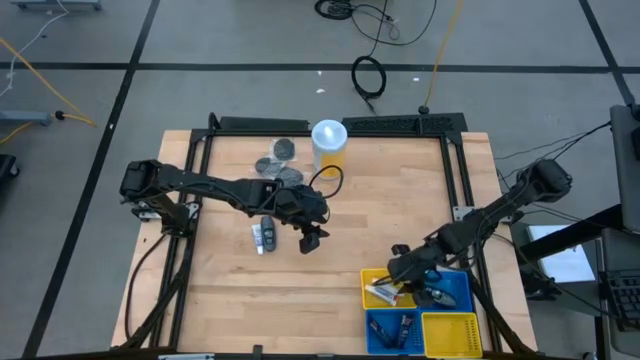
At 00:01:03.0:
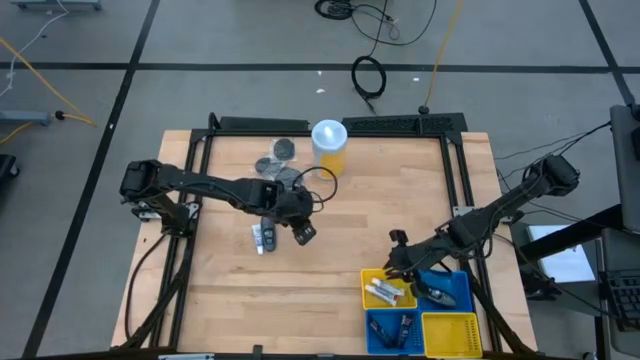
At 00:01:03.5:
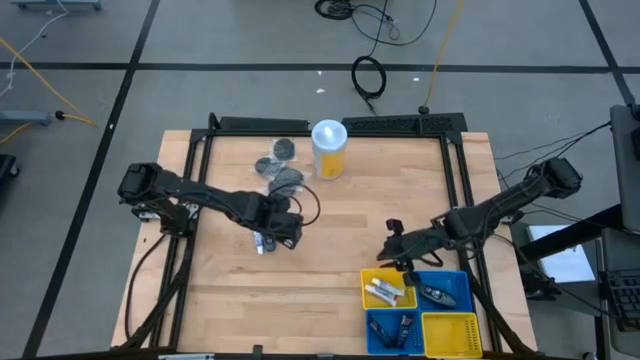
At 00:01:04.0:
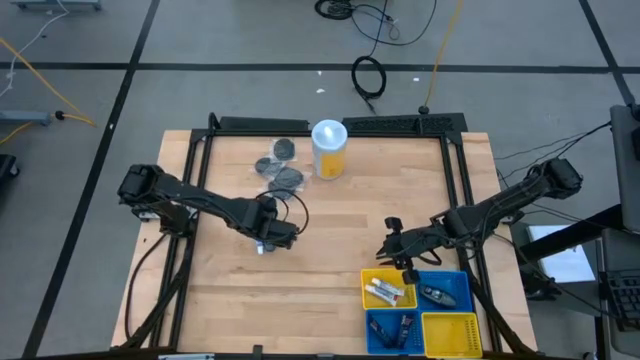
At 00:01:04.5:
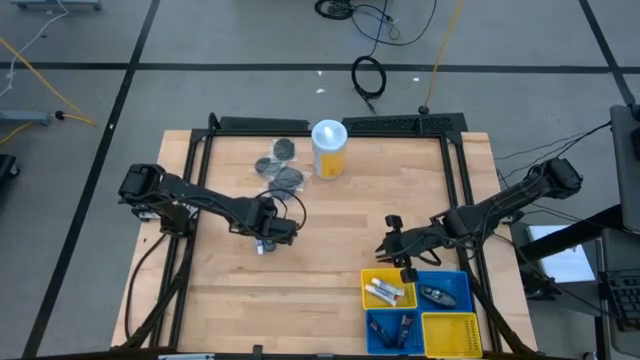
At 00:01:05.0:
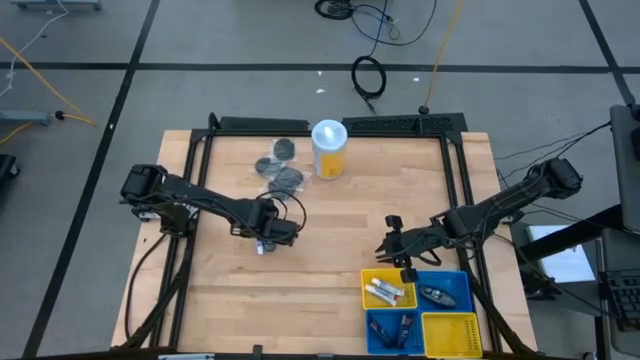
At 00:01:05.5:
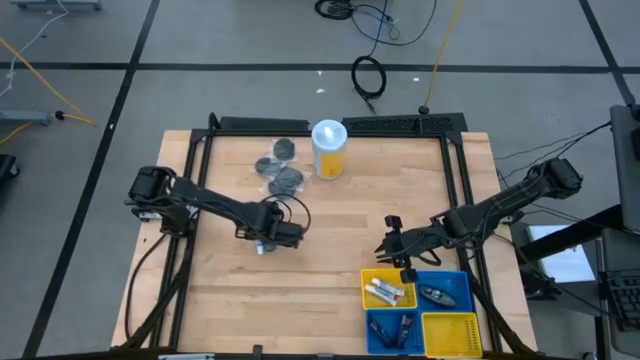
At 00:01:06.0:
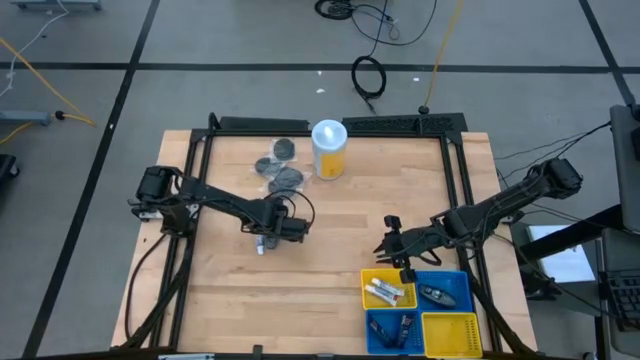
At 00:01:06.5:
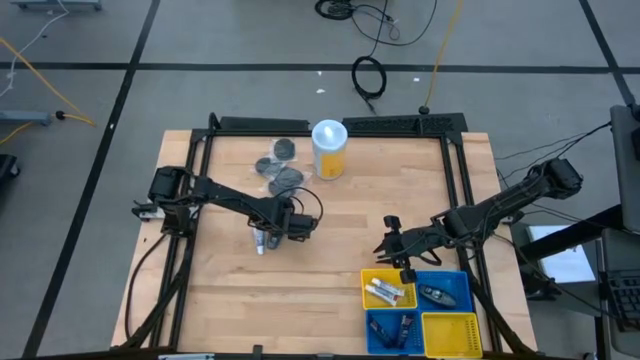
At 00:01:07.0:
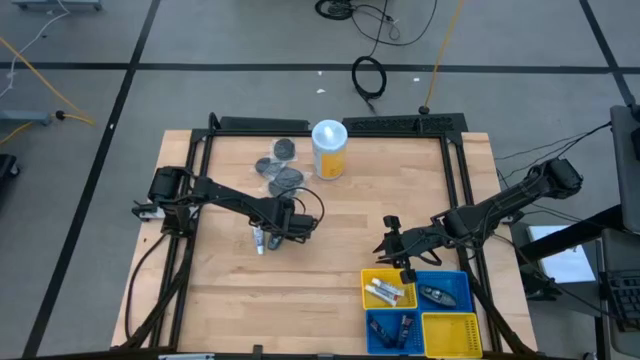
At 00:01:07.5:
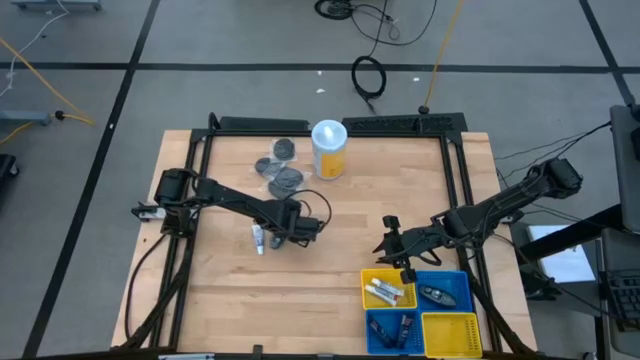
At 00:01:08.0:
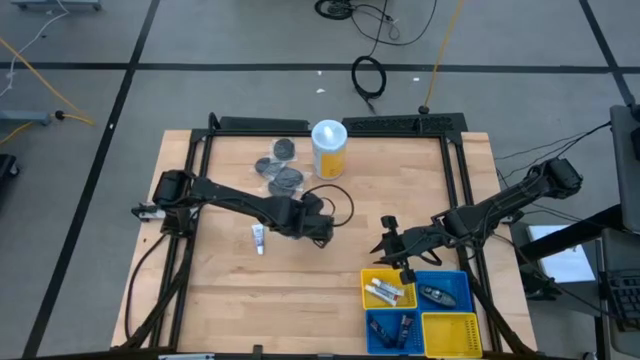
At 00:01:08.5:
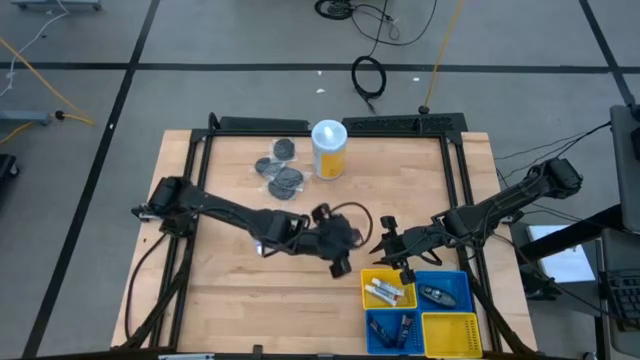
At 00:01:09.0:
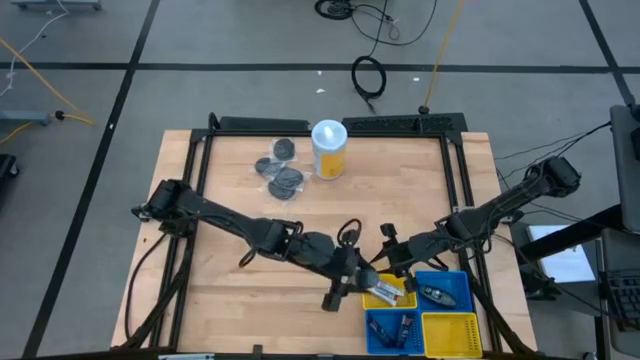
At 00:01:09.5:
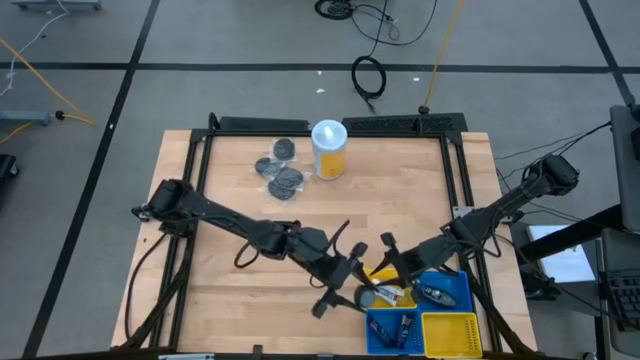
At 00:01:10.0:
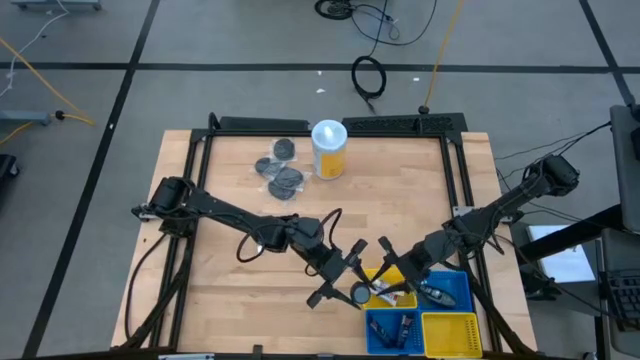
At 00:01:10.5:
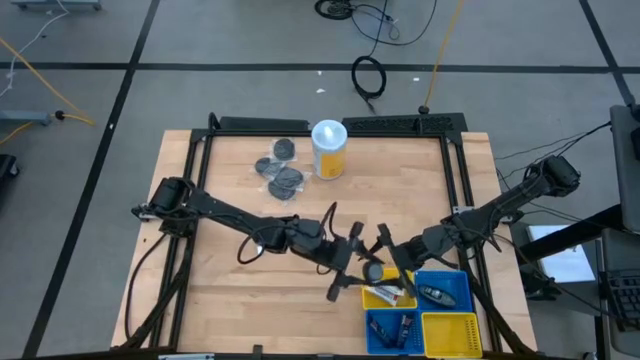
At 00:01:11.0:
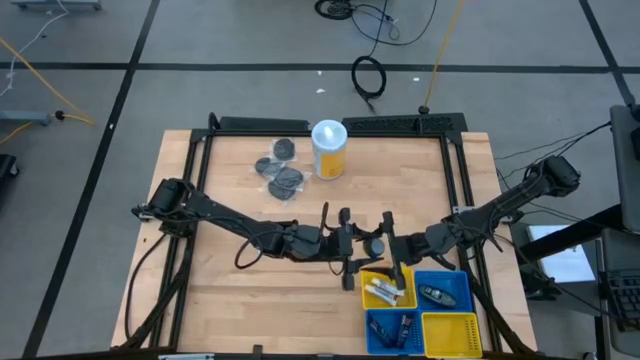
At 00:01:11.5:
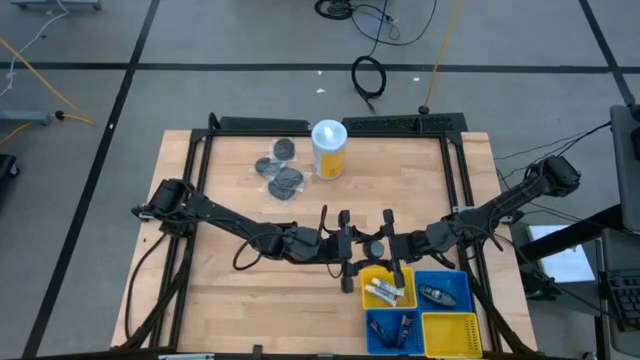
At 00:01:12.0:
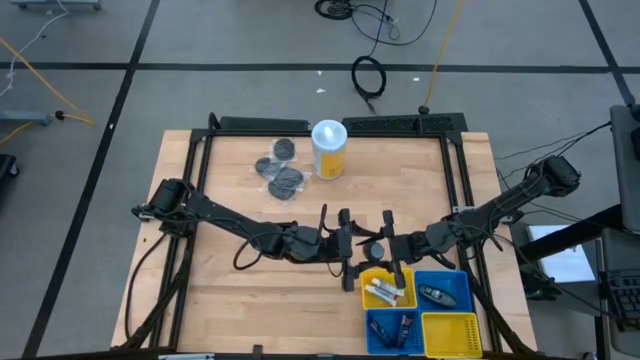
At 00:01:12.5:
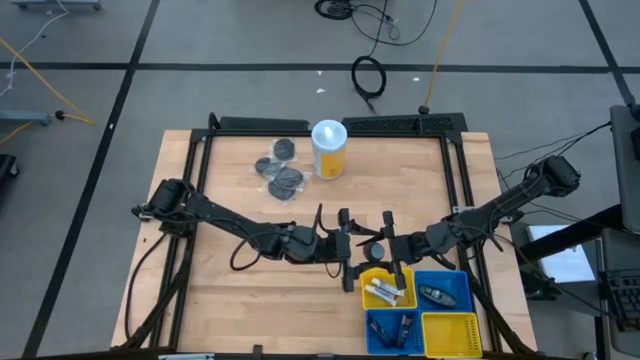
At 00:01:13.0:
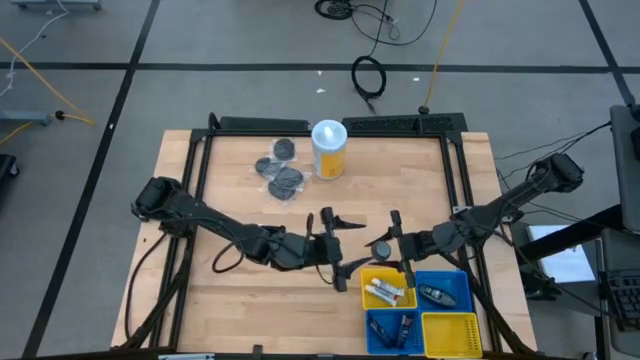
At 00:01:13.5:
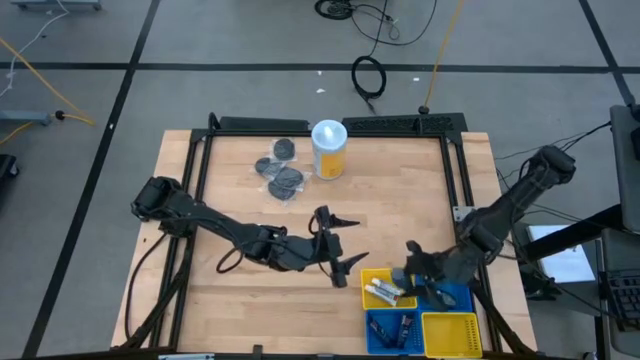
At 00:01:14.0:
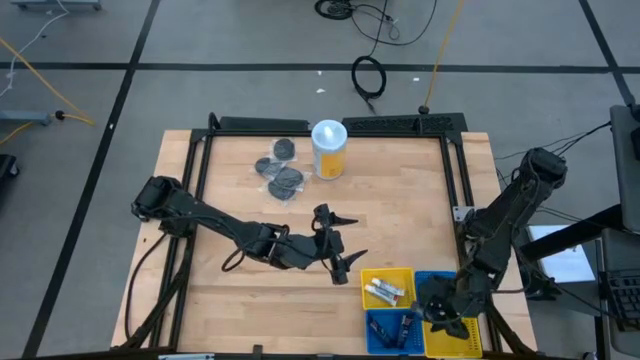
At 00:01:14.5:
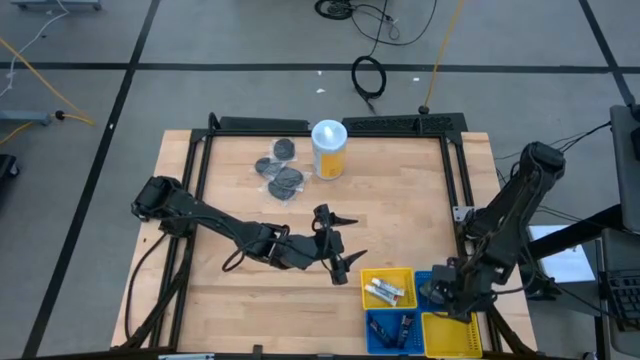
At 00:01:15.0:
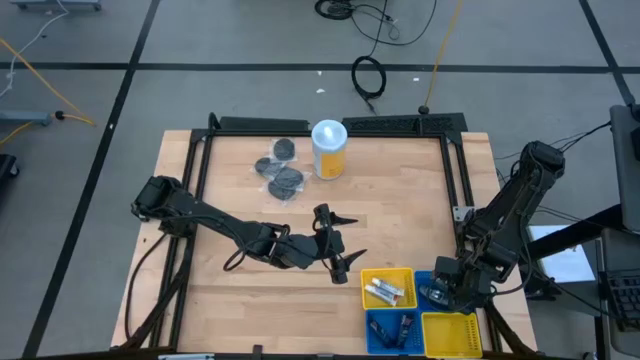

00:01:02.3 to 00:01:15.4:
Task: Pick & Place Travel size toiletries
Put the deodorant into the top blue basket

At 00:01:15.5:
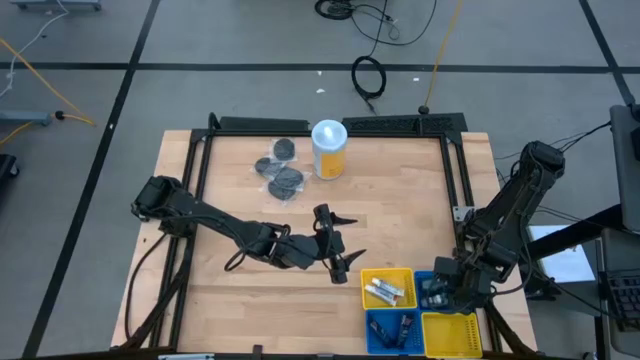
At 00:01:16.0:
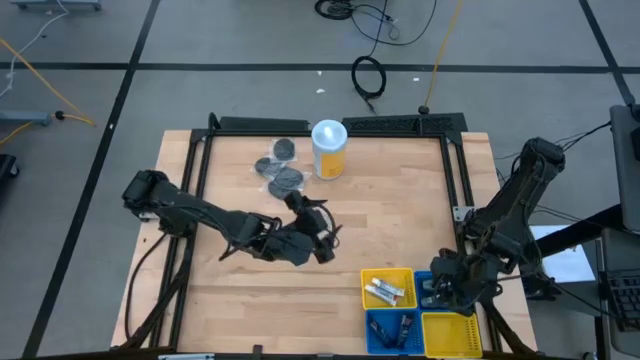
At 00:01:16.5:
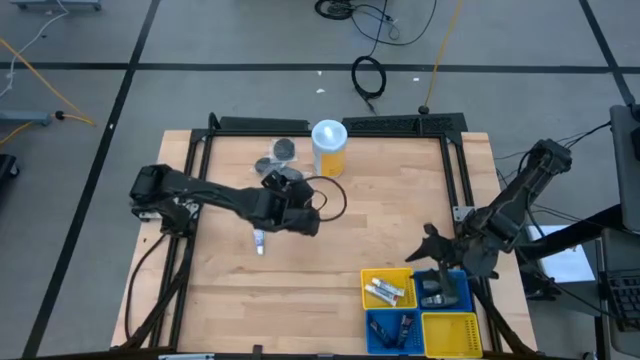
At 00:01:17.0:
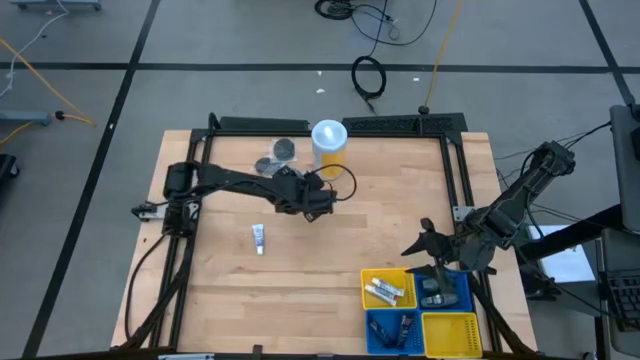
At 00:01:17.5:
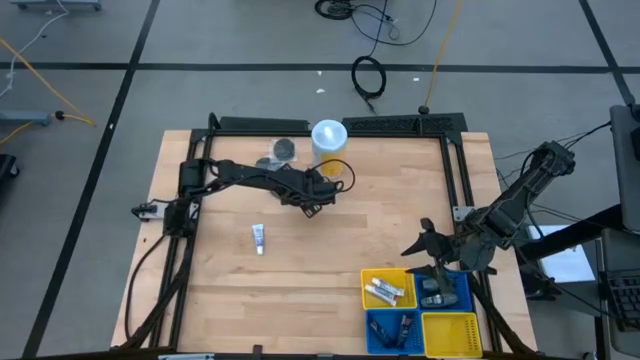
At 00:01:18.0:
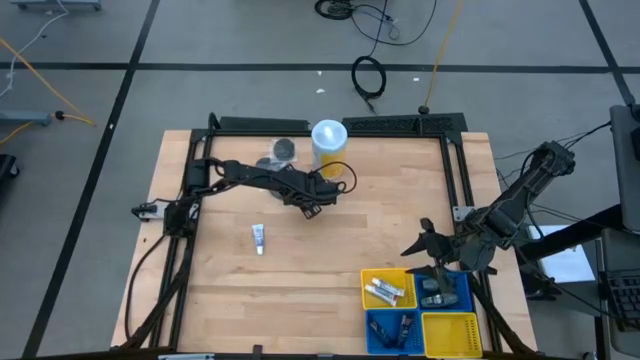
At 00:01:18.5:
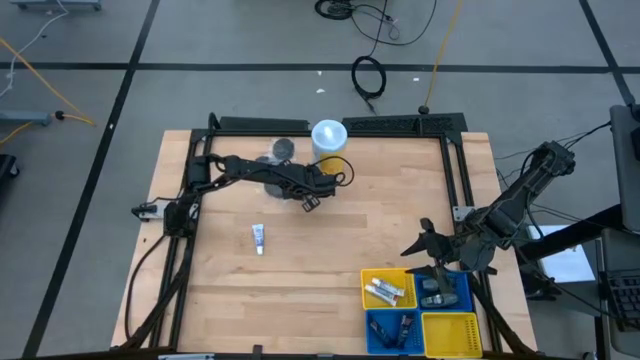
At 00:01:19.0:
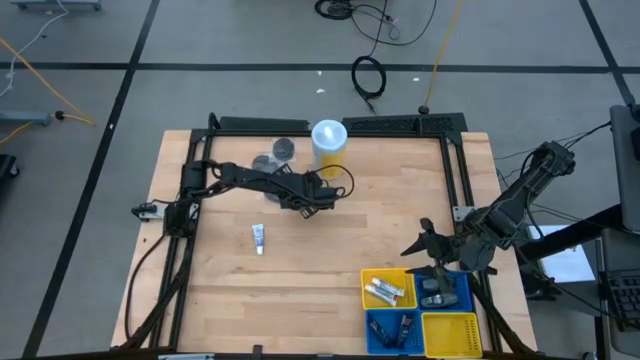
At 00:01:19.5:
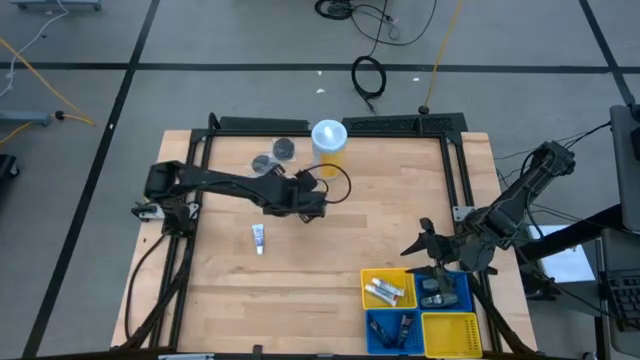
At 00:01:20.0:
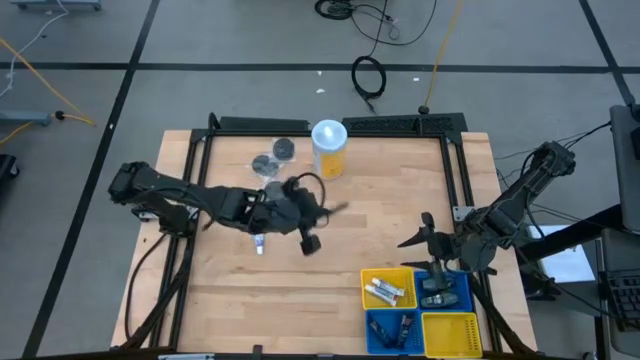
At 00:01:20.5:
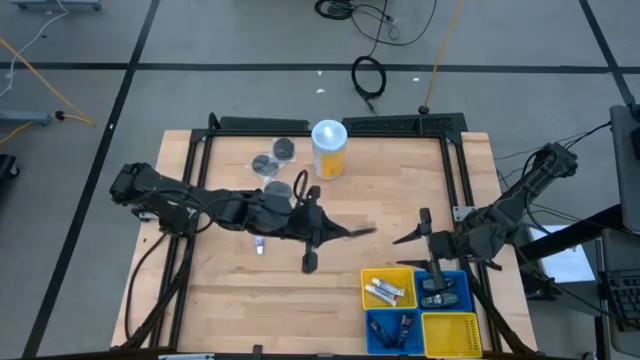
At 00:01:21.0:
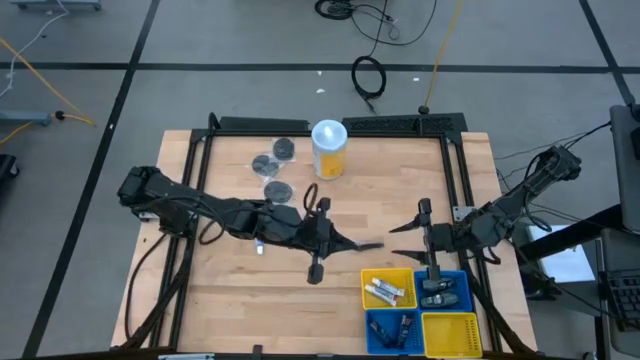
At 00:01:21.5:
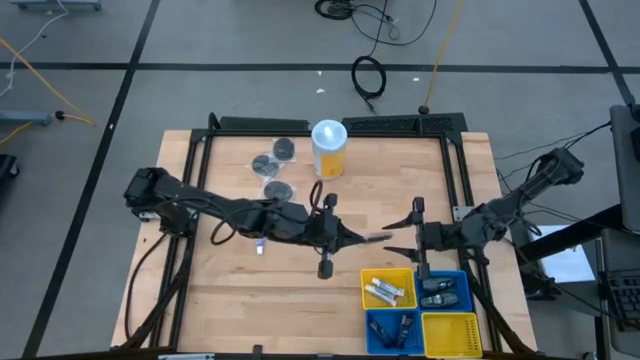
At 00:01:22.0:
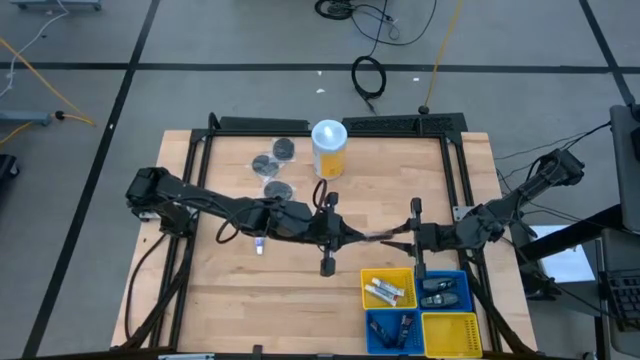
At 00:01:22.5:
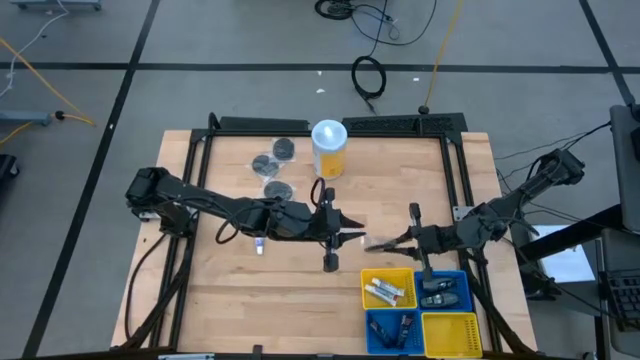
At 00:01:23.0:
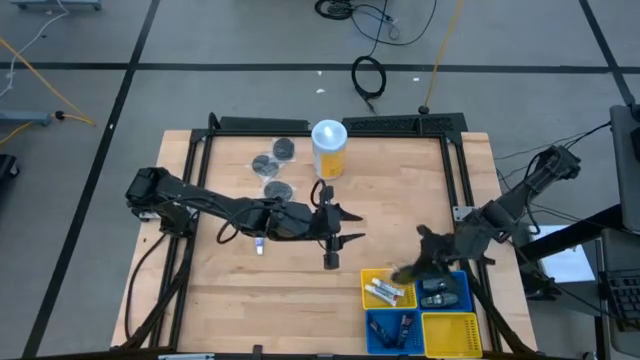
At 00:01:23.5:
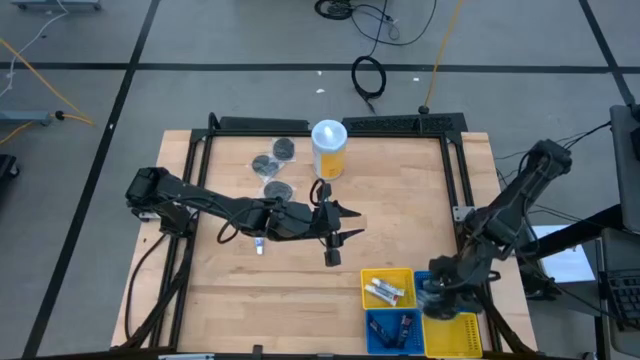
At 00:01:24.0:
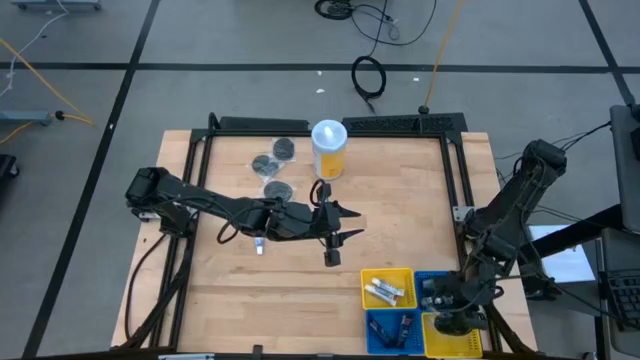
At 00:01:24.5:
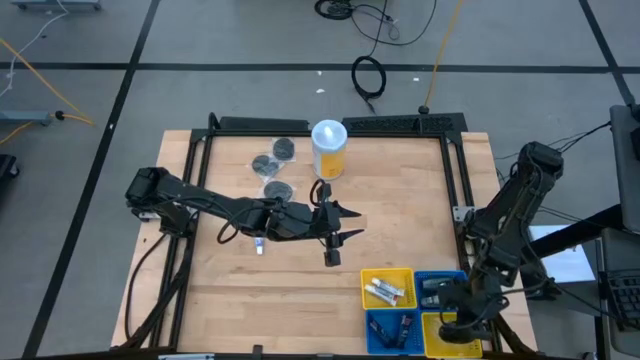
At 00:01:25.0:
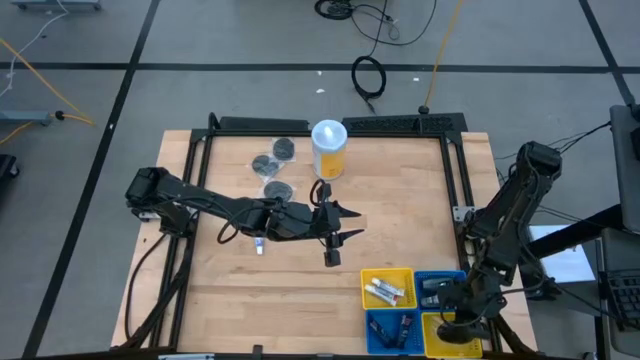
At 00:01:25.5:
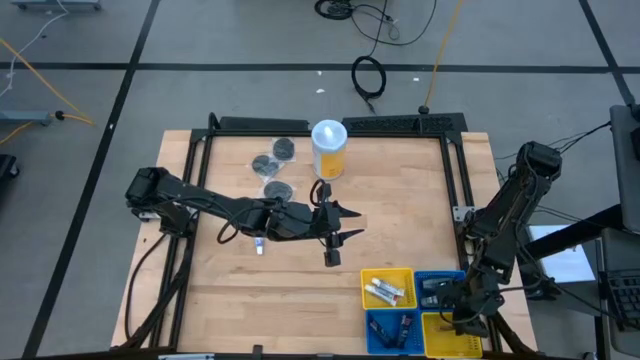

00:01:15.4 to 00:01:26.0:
Put the hairbrush into the bottom yellow basket
